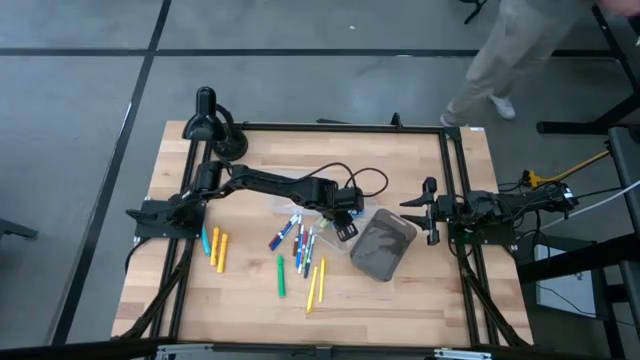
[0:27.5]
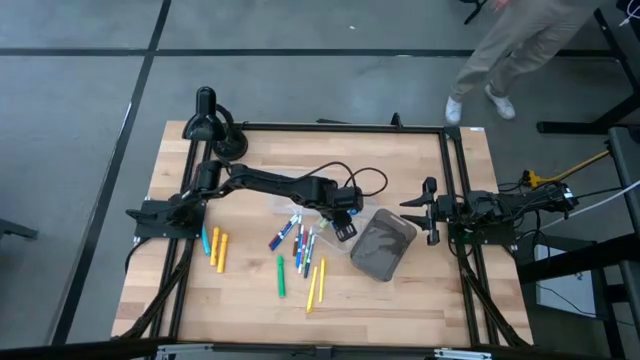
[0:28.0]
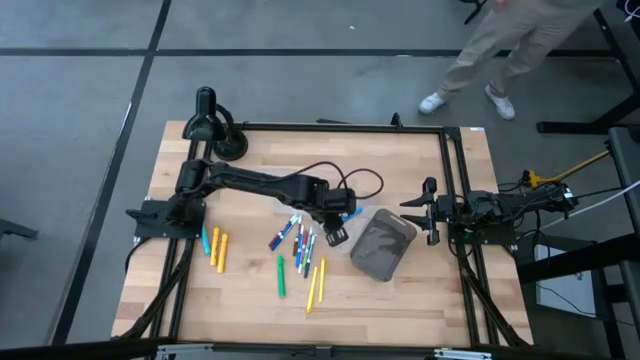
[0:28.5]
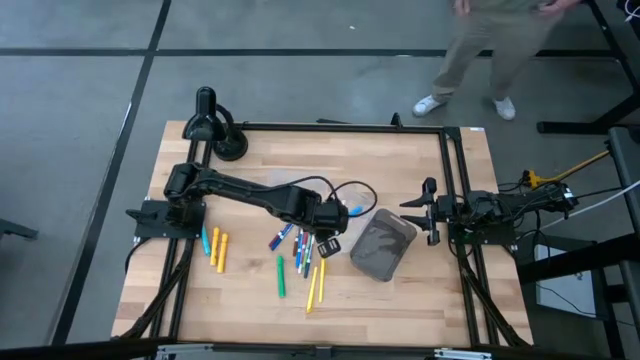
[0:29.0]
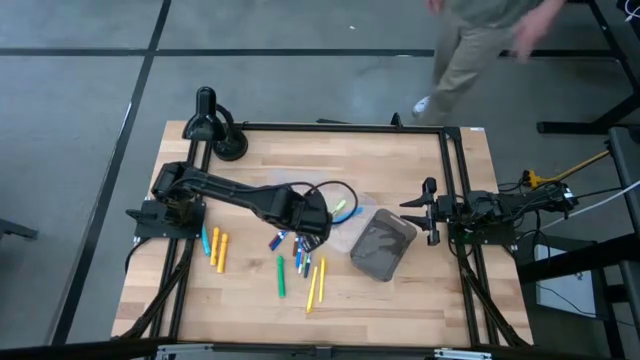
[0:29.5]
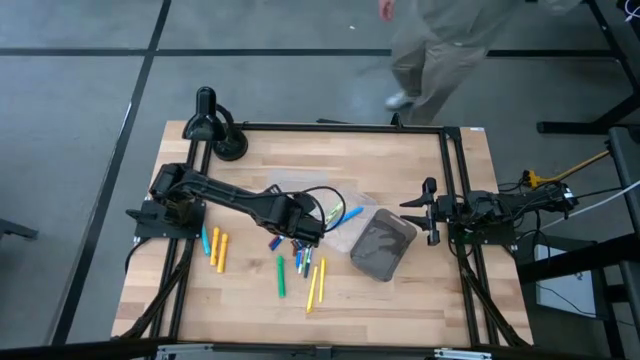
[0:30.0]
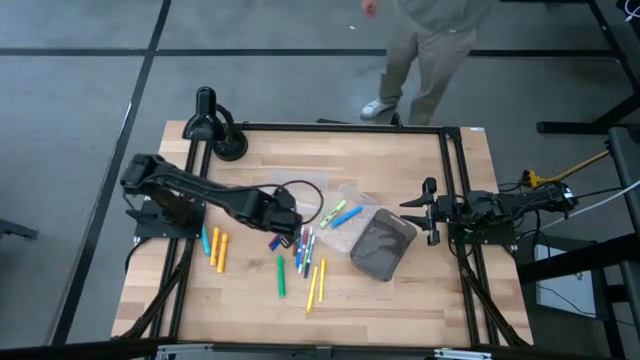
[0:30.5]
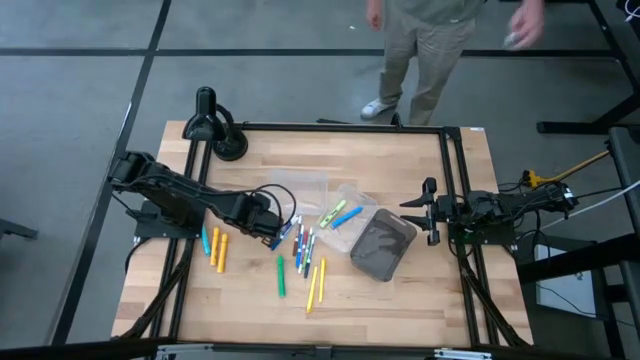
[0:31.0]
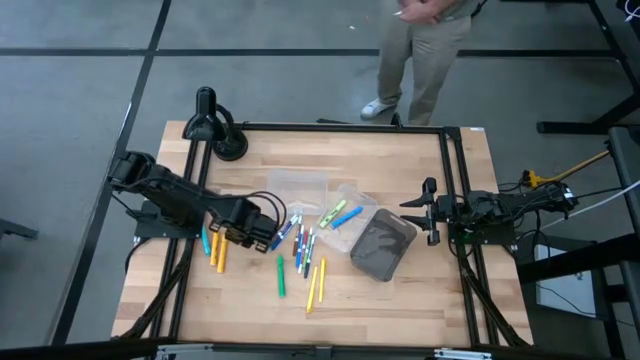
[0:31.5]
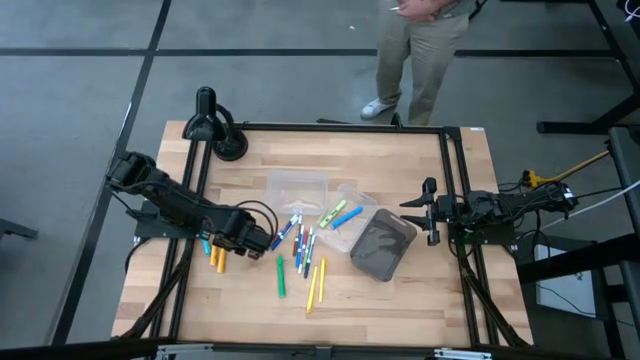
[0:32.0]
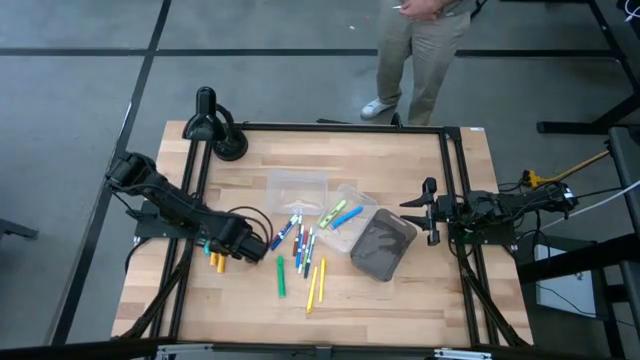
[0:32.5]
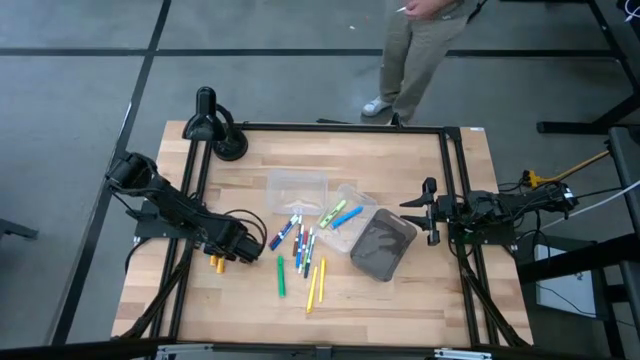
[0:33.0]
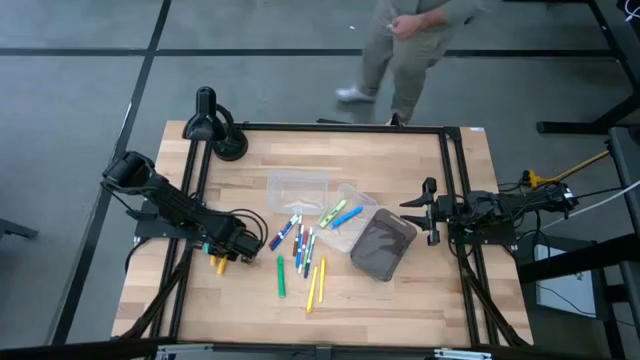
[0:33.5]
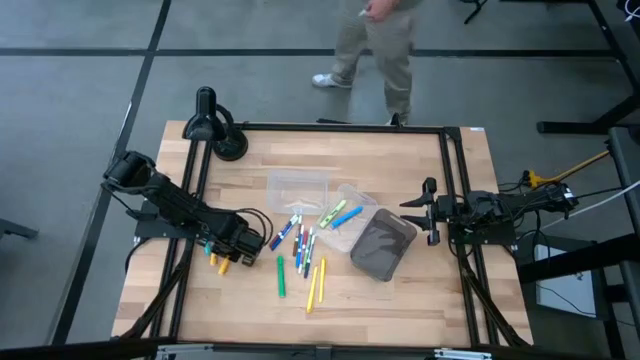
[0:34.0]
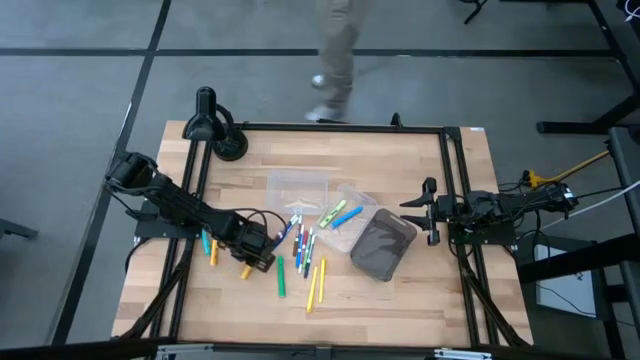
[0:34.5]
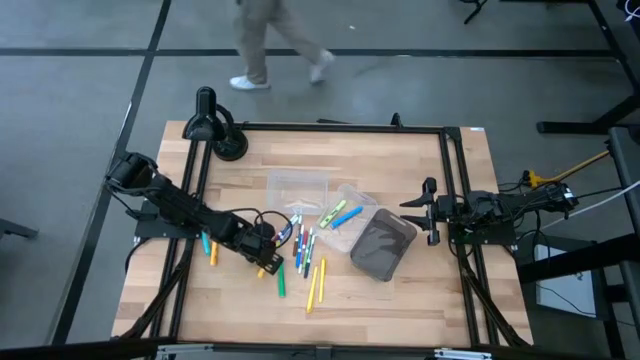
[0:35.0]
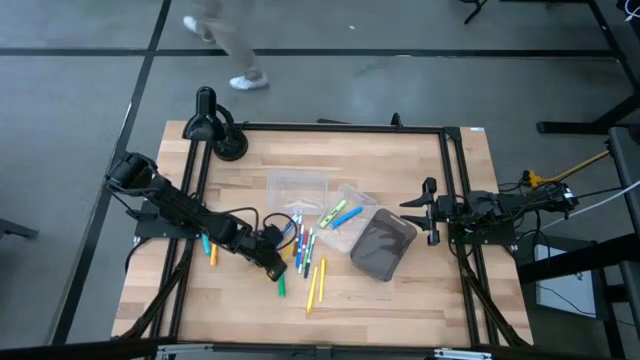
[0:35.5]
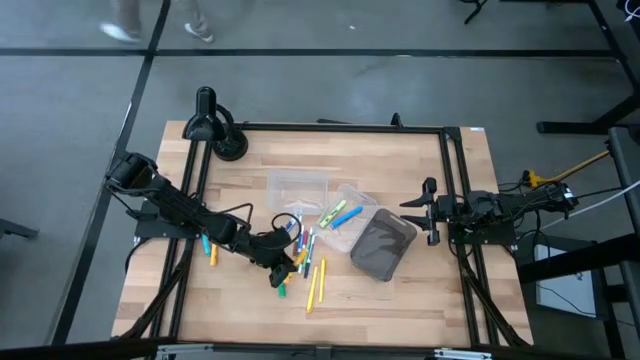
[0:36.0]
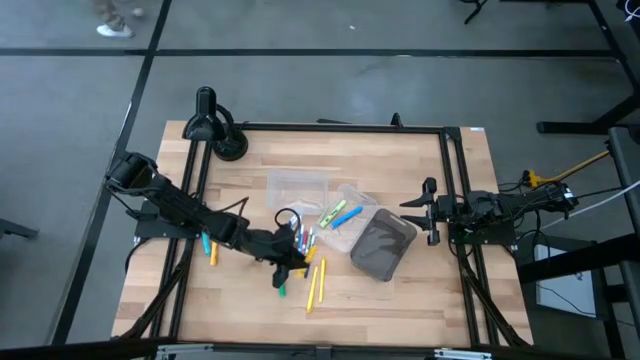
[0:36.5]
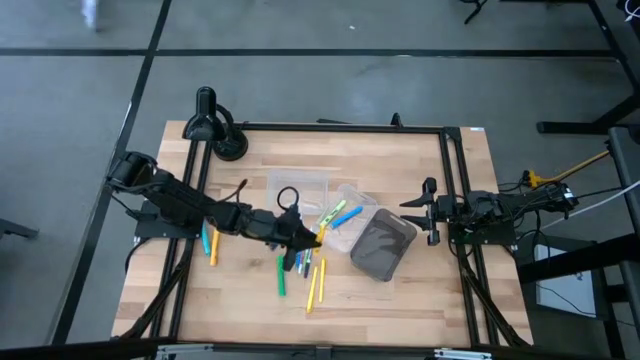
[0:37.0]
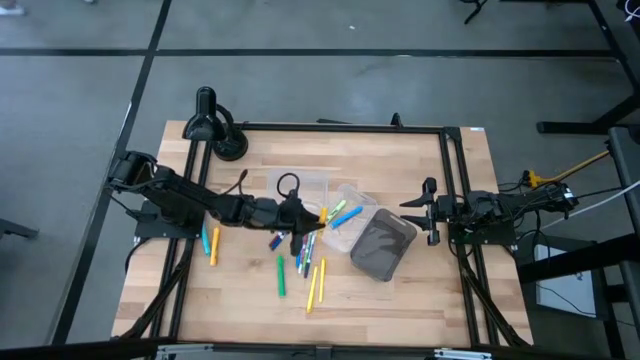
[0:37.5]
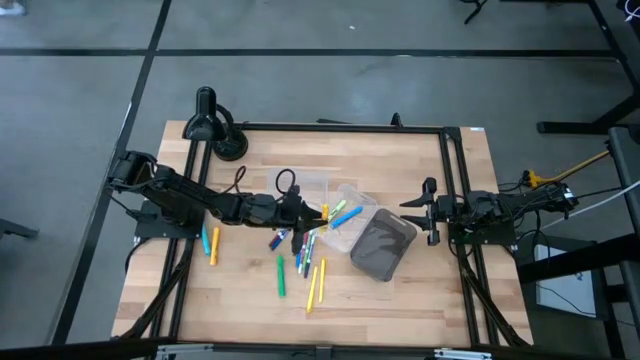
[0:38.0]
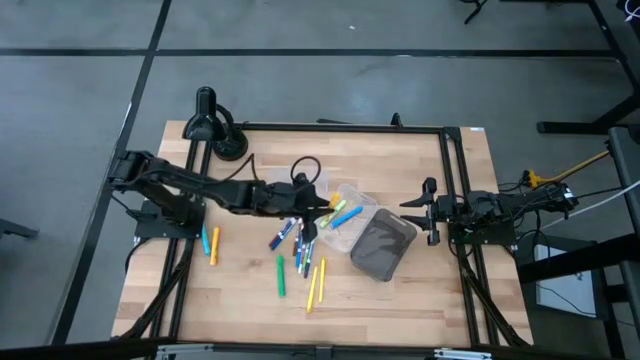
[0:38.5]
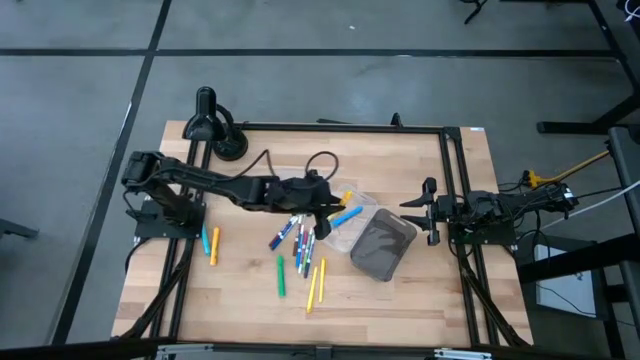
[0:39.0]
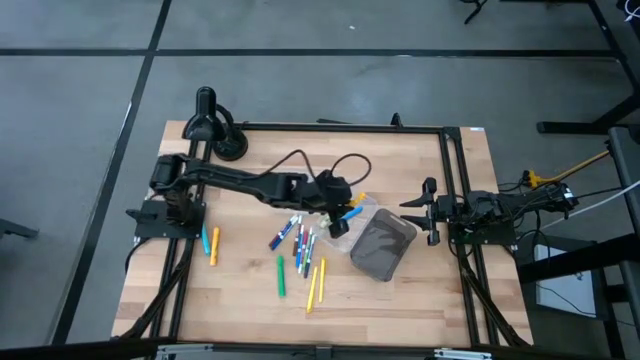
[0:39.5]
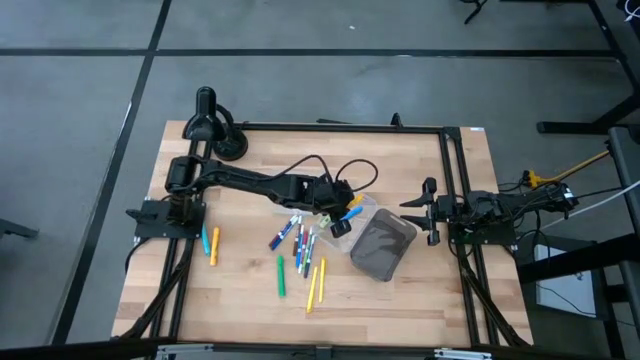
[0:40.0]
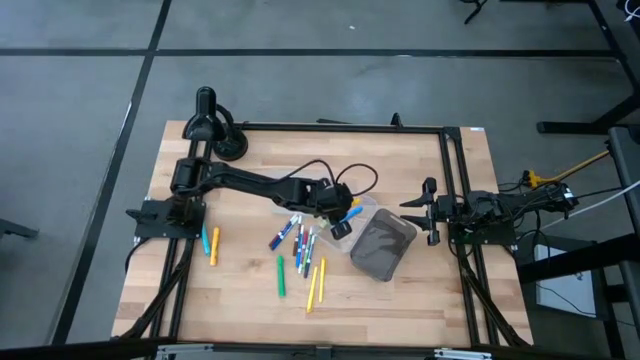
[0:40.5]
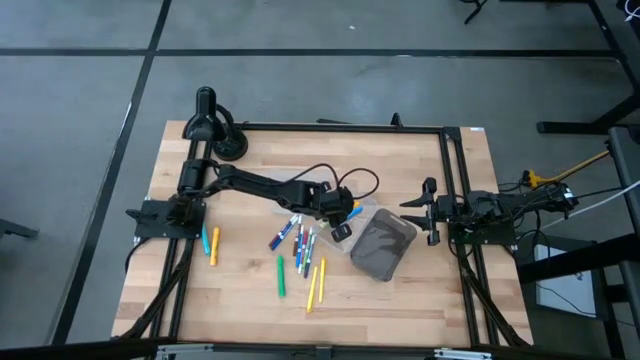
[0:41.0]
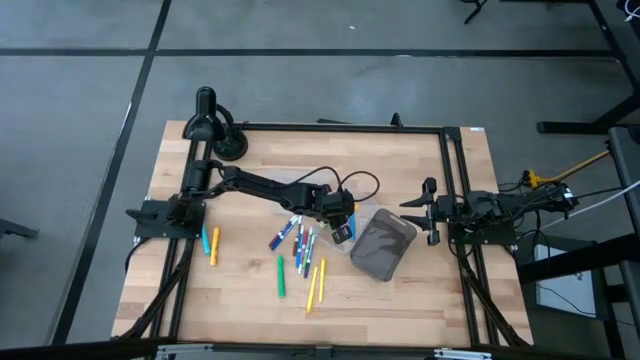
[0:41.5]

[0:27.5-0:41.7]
Task: Pick & Place Markers
Put the right yellow highlighter pen into the right transparent bin

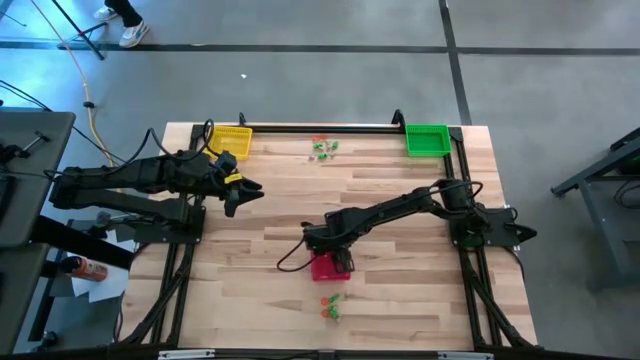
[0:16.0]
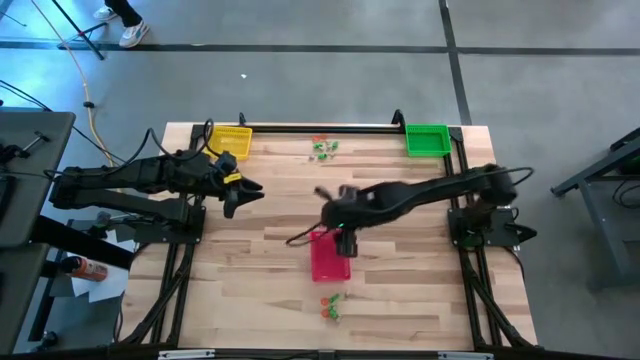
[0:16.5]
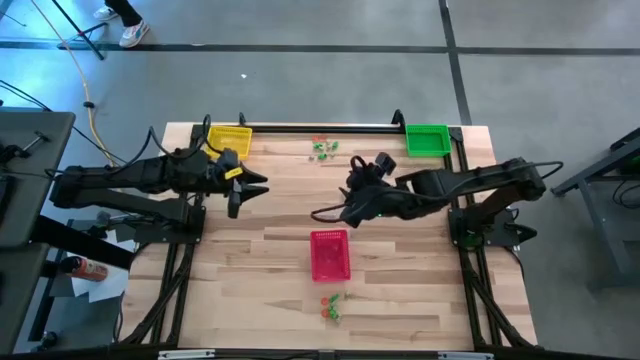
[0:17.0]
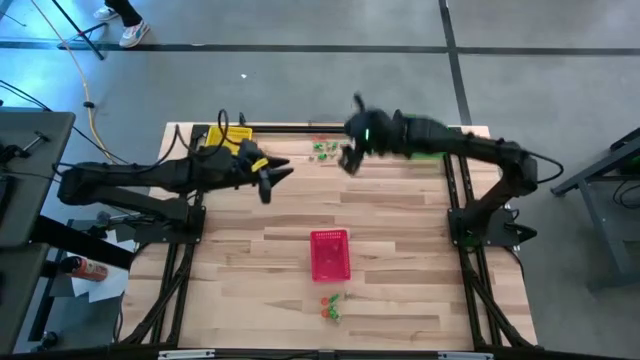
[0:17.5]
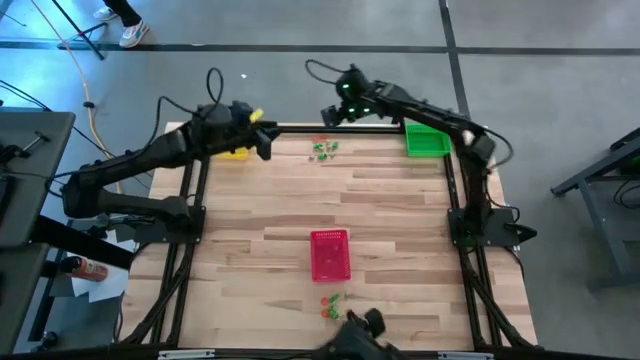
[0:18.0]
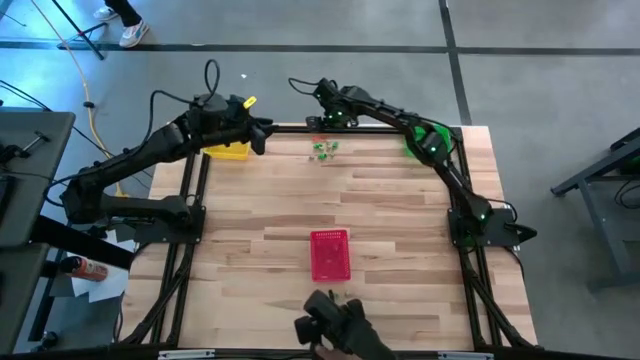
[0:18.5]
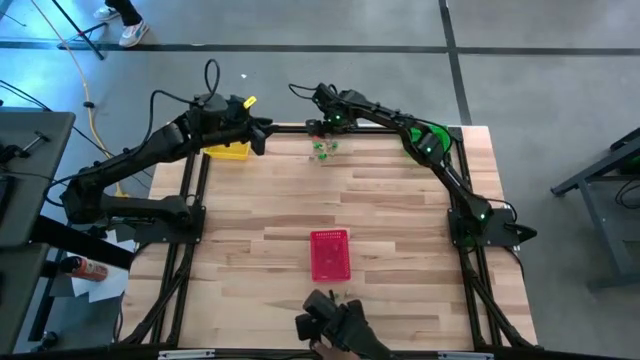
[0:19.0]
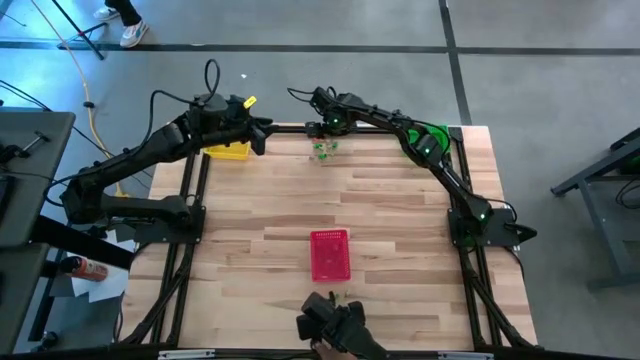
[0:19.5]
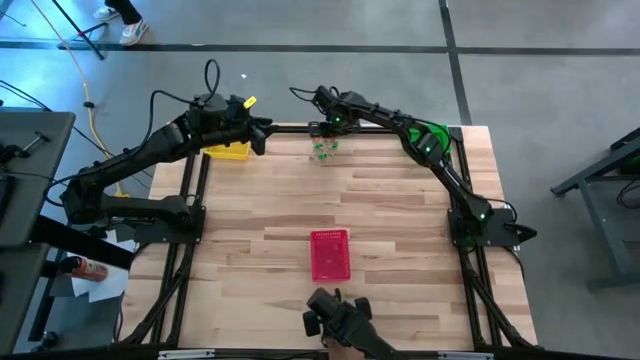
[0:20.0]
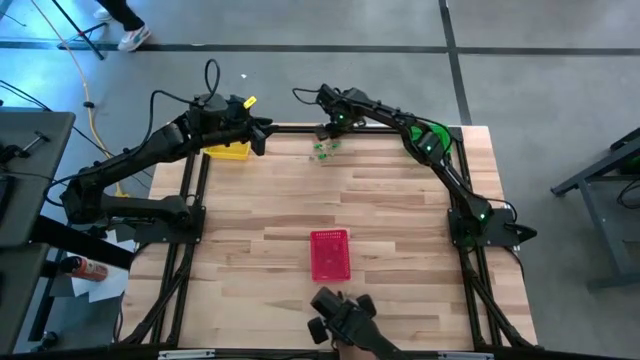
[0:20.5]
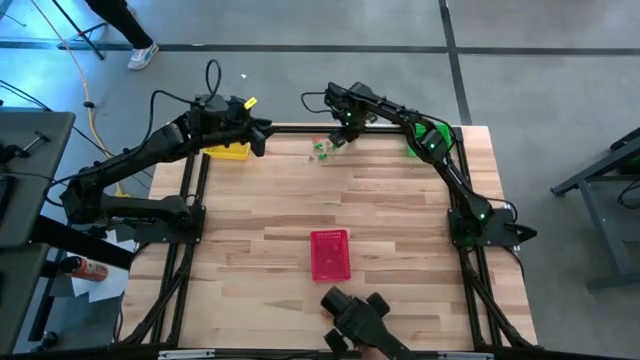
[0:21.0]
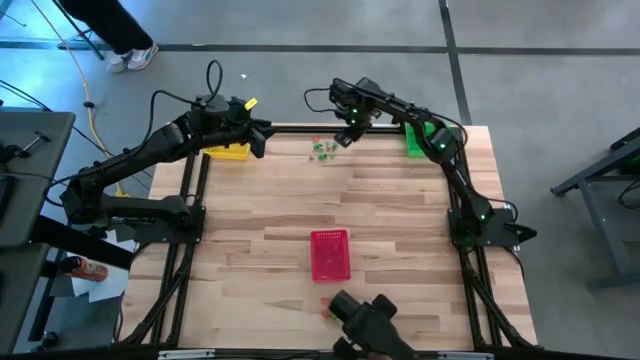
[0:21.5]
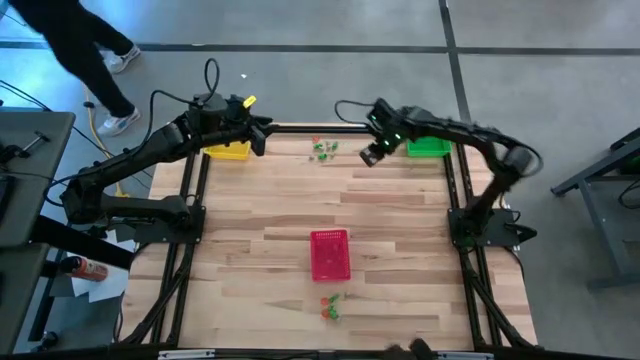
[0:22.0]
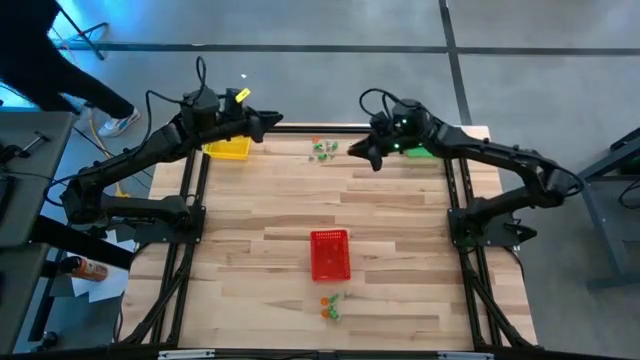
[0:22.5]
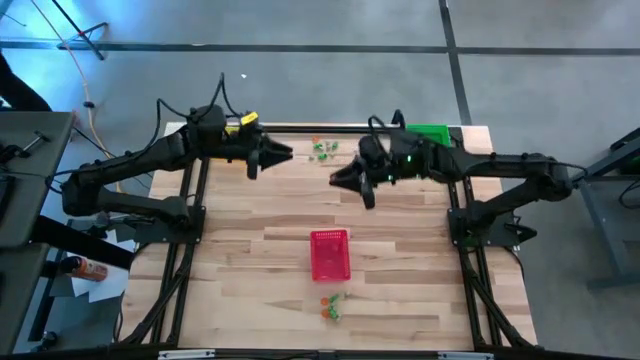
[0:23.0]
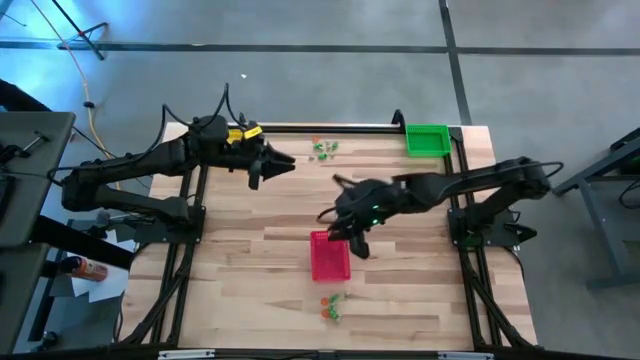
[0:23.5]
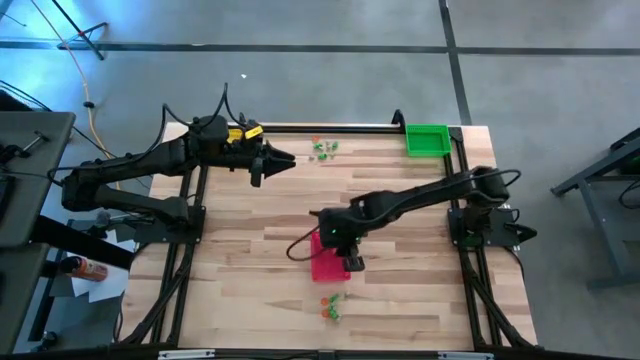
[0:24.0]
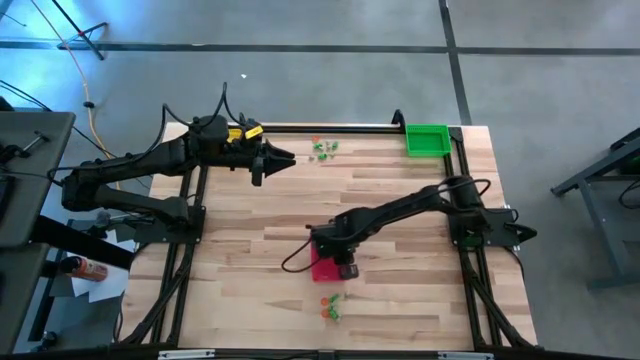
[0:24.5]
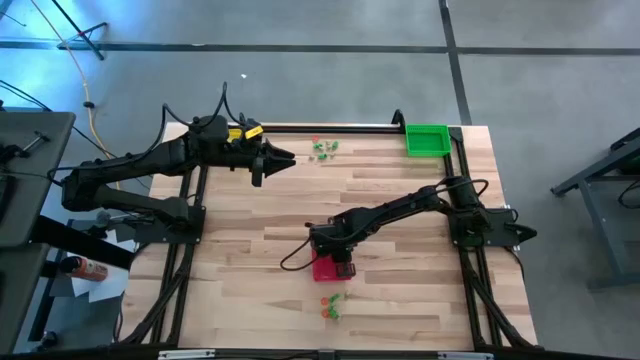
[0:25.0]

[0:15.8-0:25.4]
Task: Sort Halloween decoration
Put the orange pumpkin toy into the red bin
